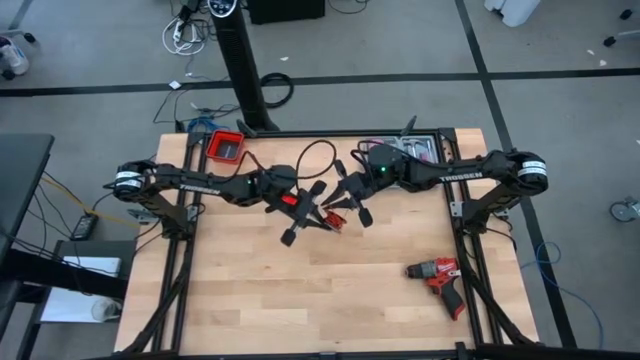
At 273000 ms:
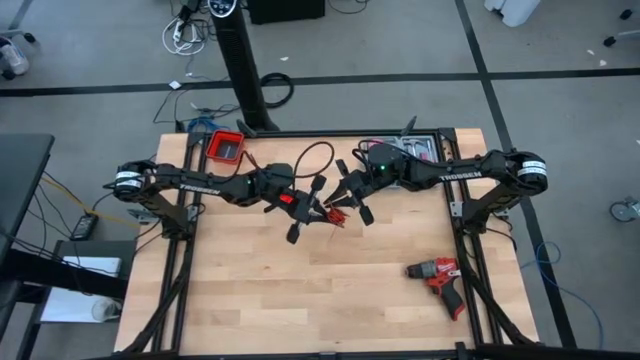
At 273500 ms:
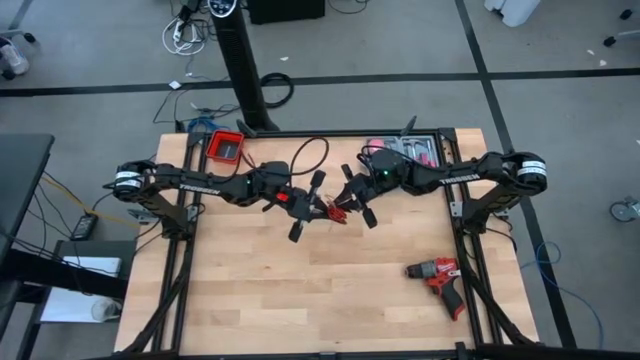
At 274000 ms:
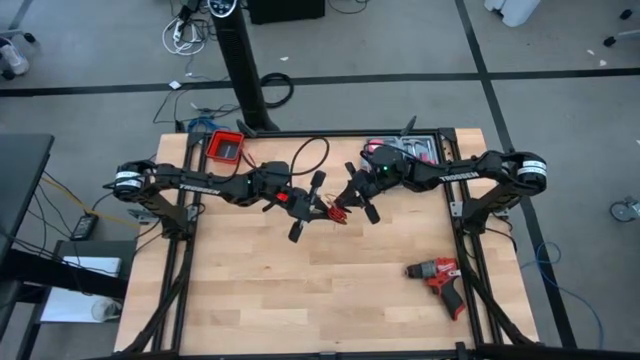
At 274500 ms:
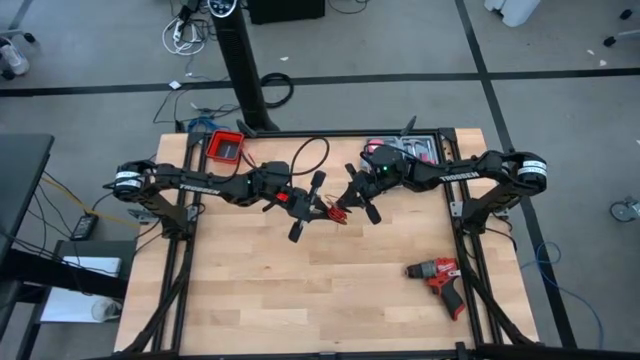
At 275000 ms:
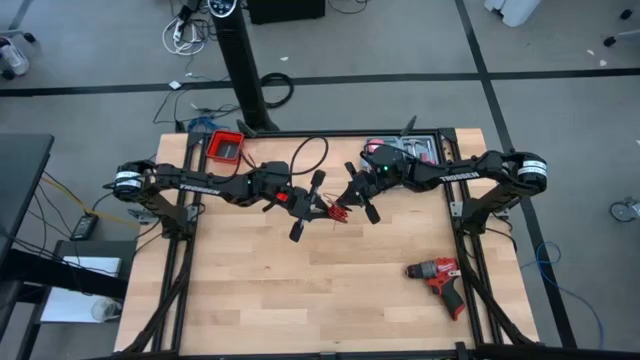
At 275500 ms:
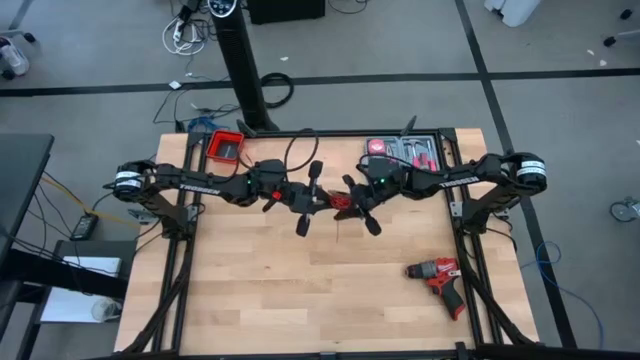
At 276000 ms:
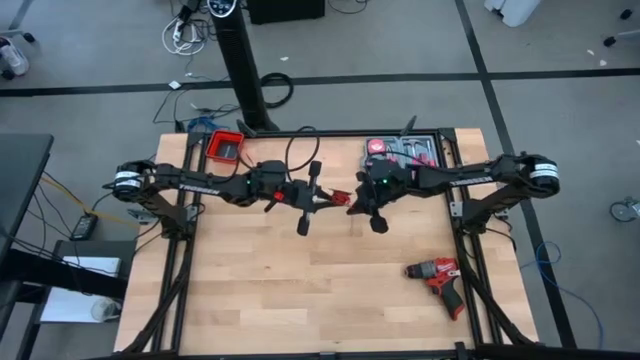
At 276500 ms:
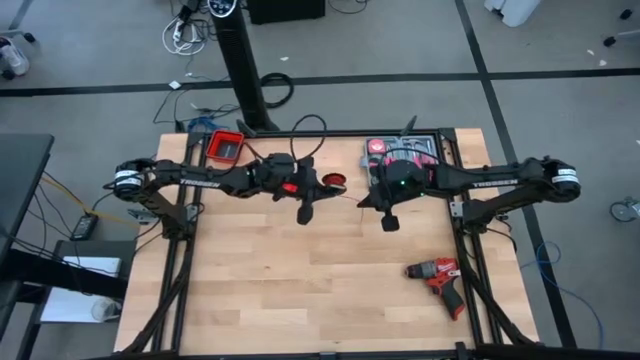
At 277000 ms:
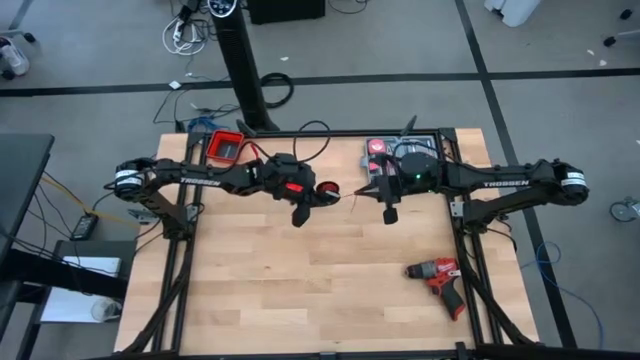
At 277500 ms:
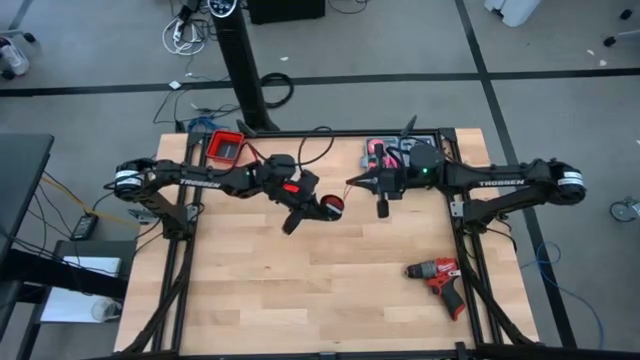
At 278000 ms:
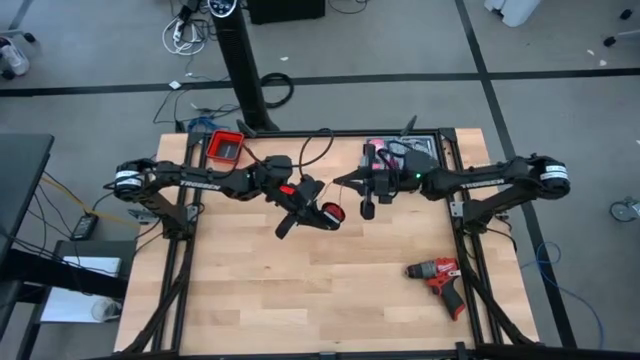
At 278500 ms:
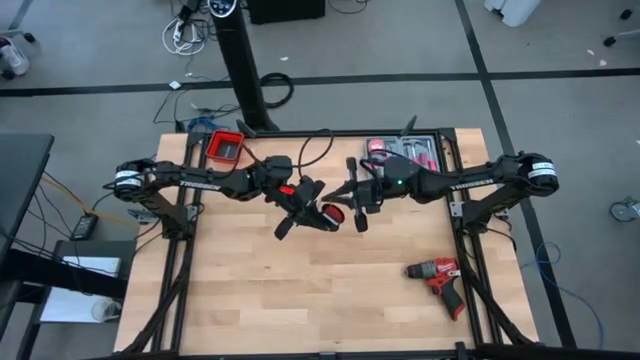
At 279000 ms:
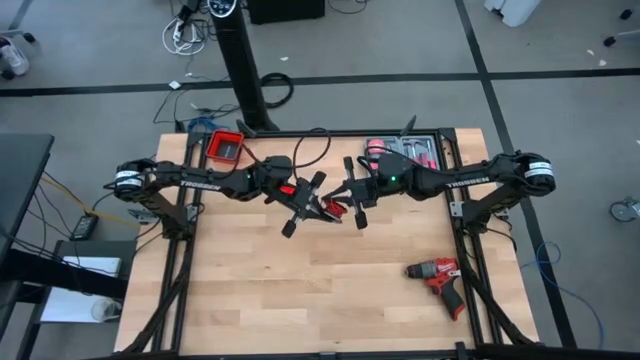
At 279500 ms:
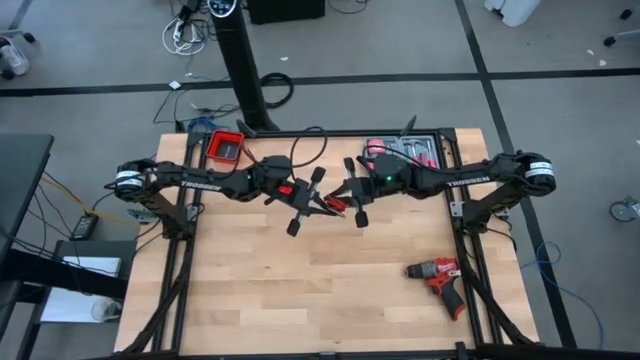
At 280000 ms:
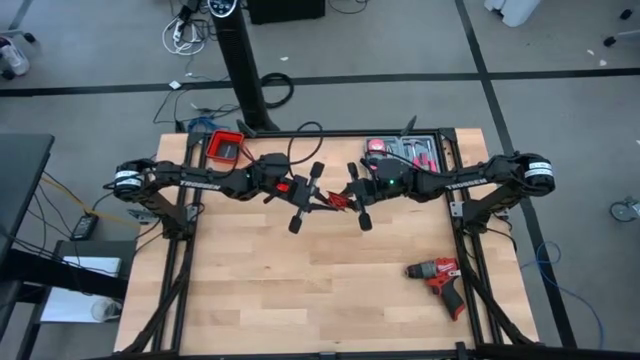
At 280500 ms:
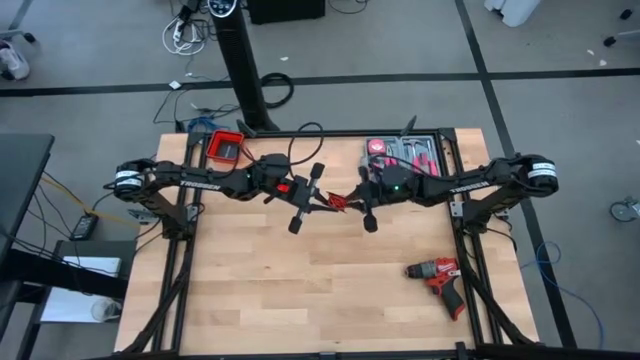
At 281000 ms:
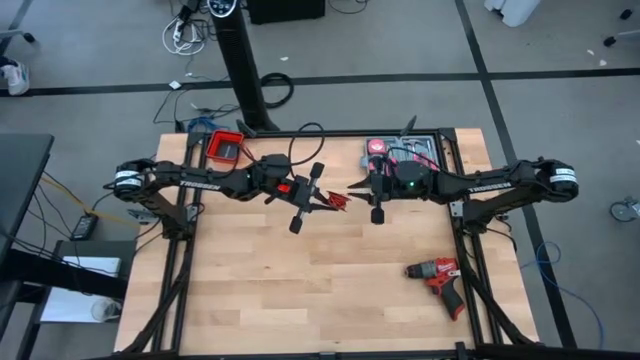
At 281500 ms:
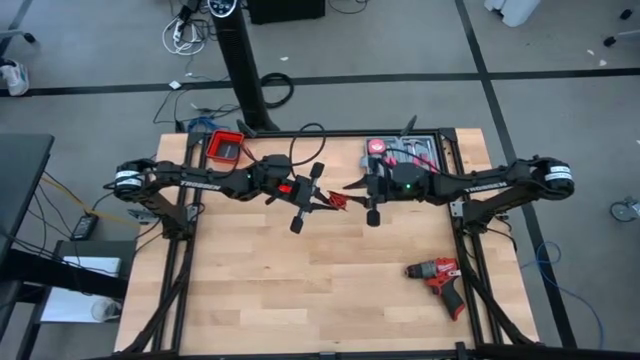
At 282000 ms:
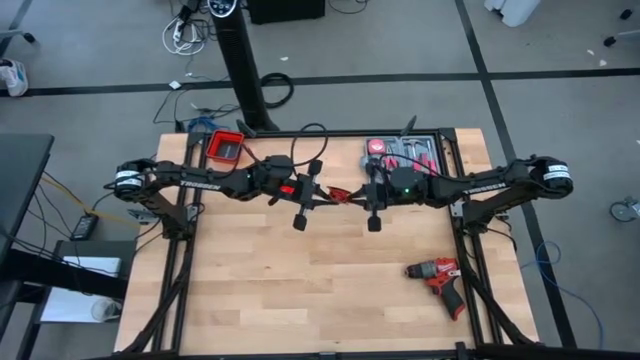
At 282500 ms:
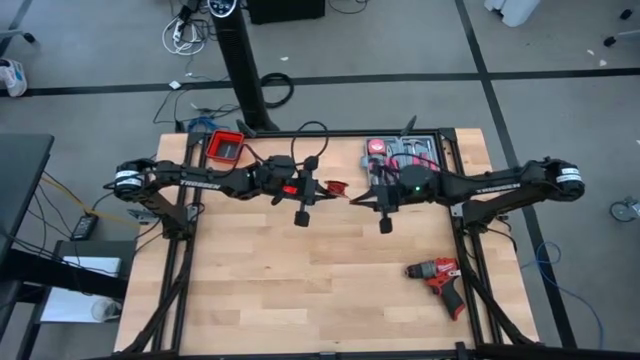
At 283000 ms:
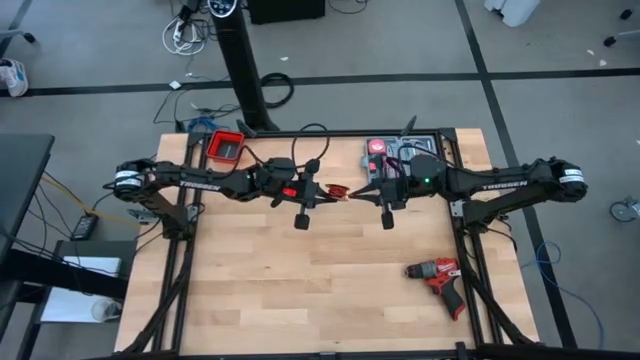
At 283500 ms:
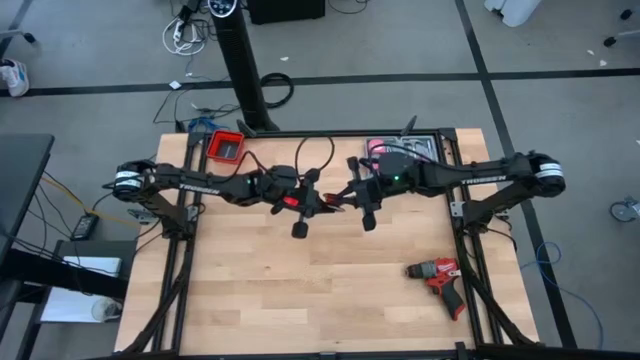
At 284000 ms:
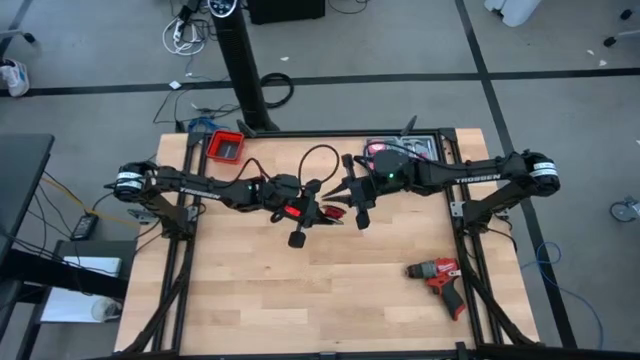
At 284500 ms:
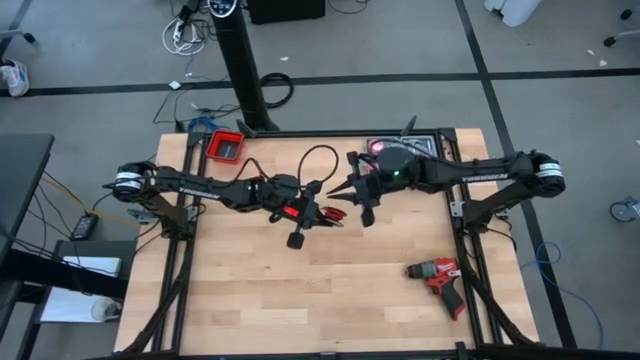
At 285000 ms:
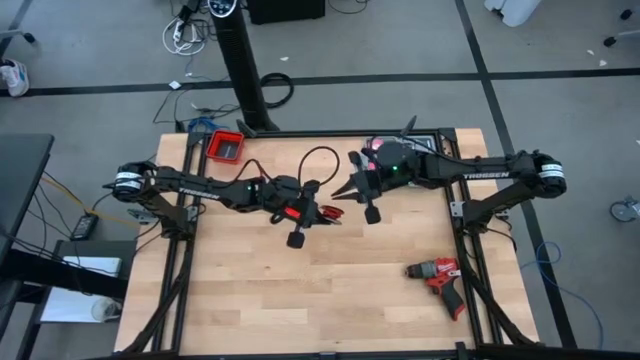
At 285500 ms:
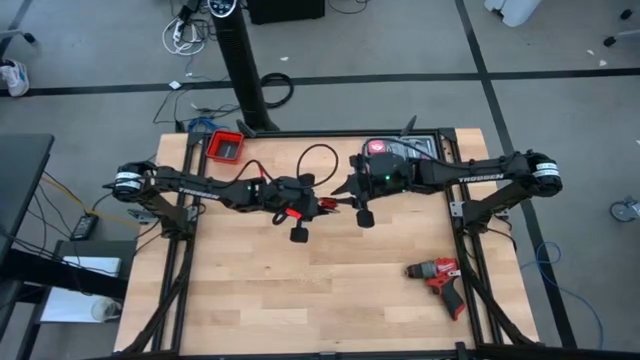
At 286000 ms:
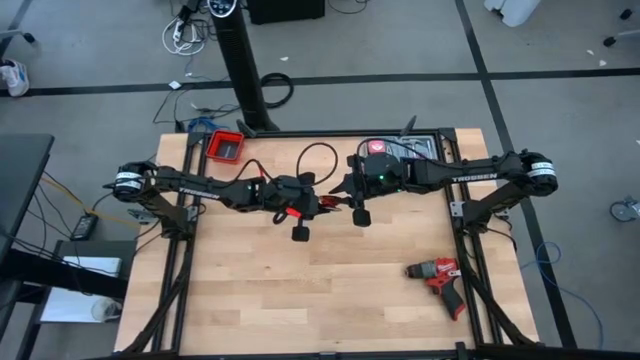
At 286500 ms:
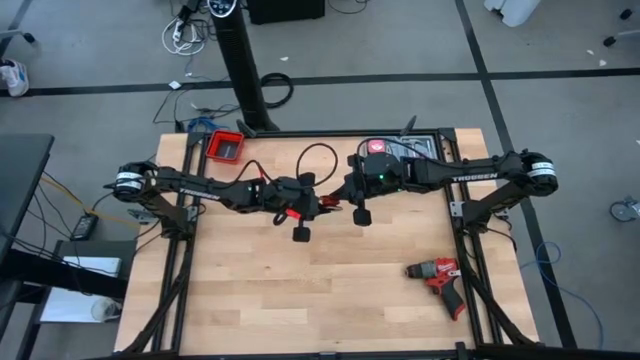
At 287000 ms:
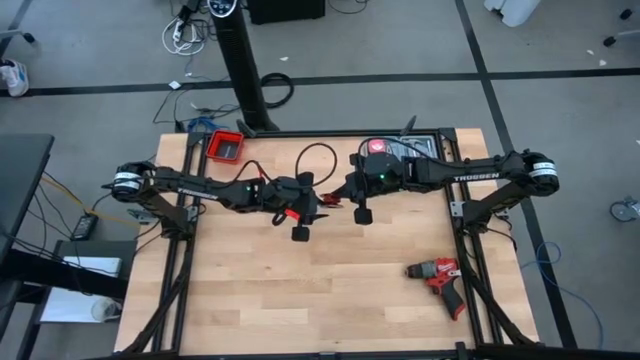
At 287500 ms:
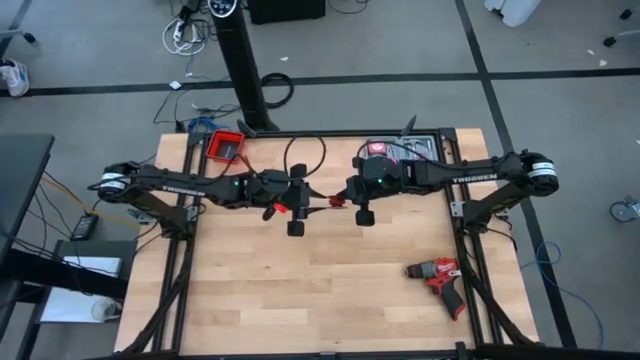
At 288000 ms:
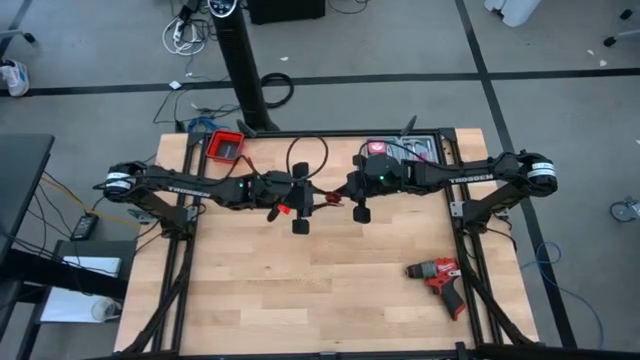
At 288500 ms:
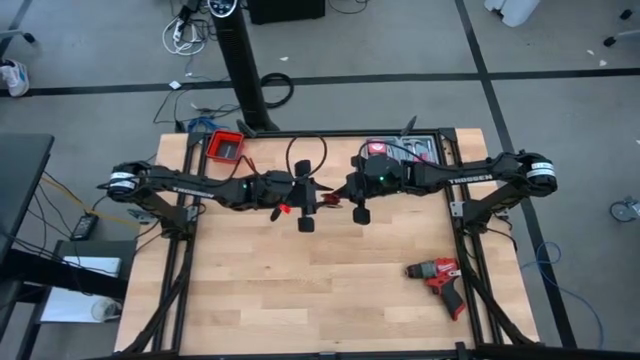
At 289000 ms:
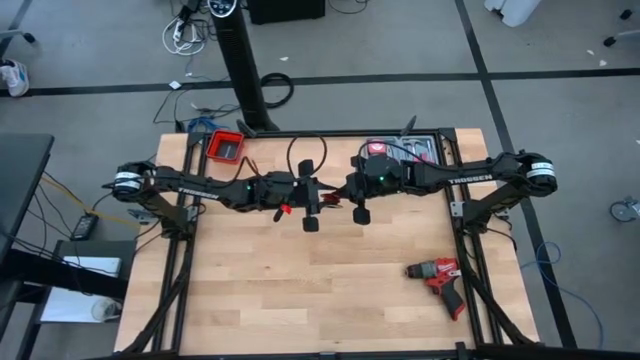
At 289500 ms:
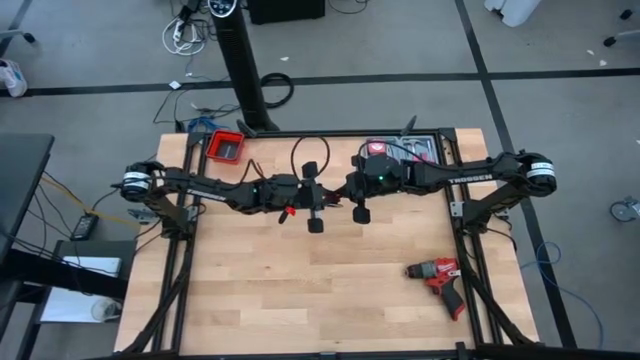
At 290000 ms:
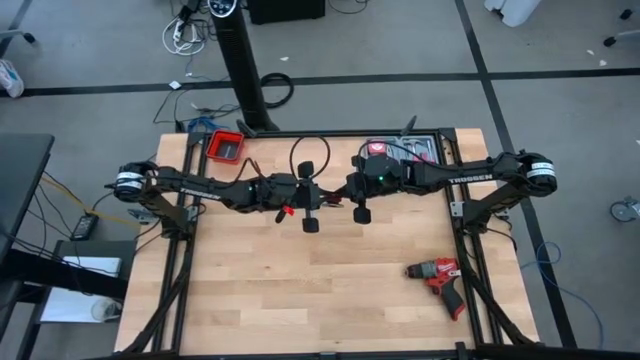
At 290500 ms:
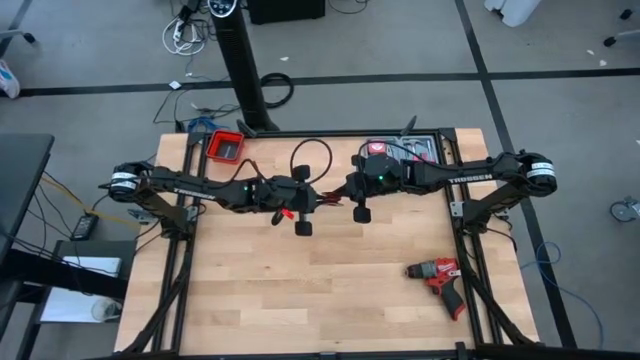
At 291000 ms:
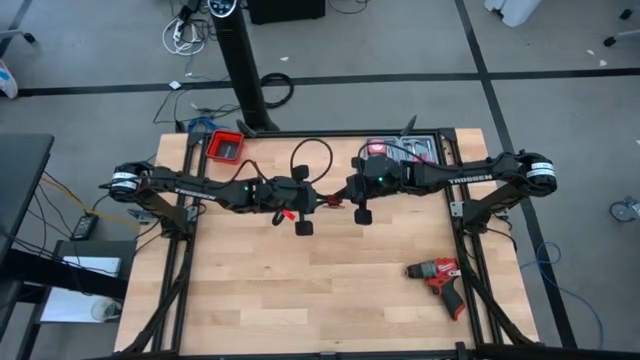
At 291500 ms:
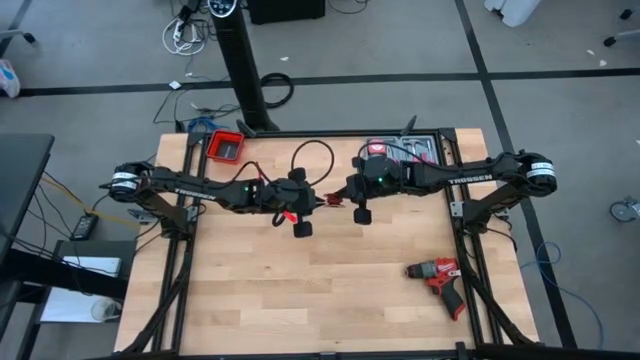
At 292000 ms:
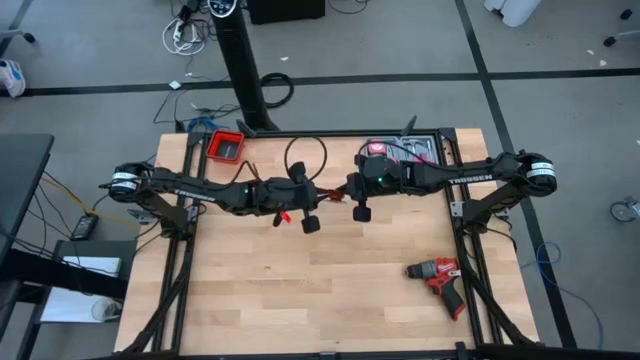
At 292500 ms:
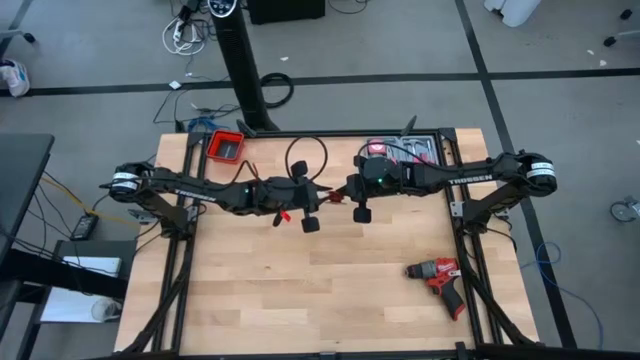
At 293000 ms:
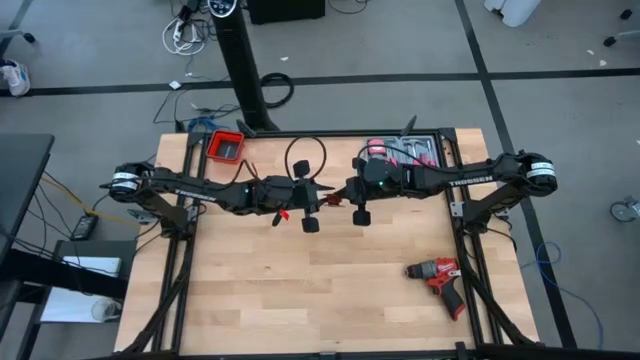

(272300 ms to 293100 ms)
Task: Coil cords
Coil the red wire onto the black spool

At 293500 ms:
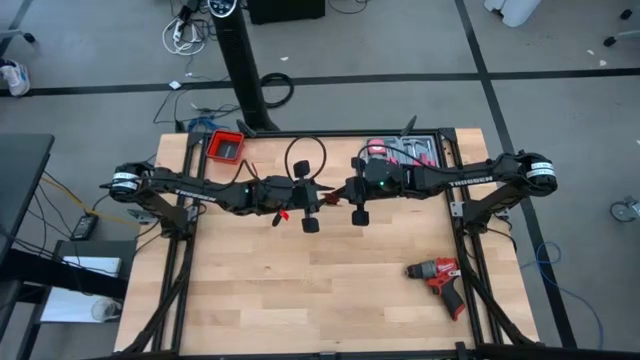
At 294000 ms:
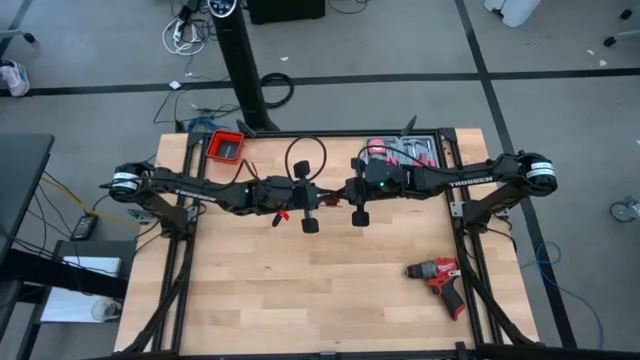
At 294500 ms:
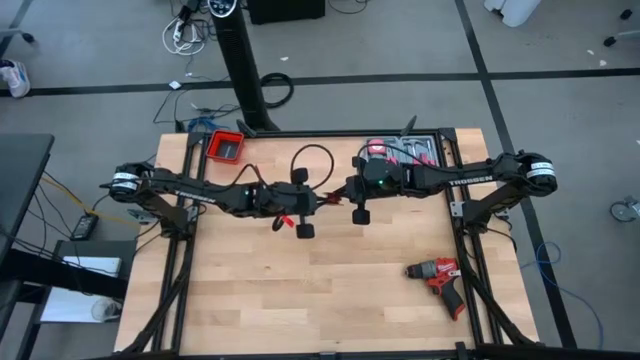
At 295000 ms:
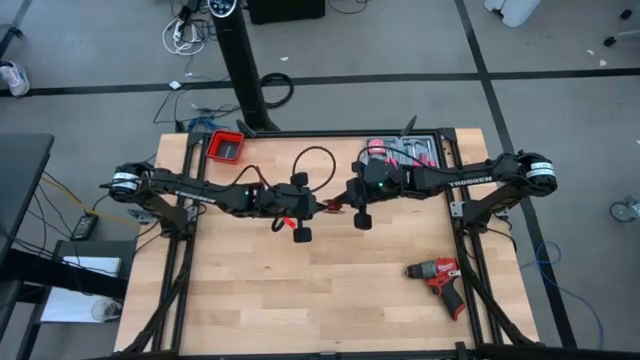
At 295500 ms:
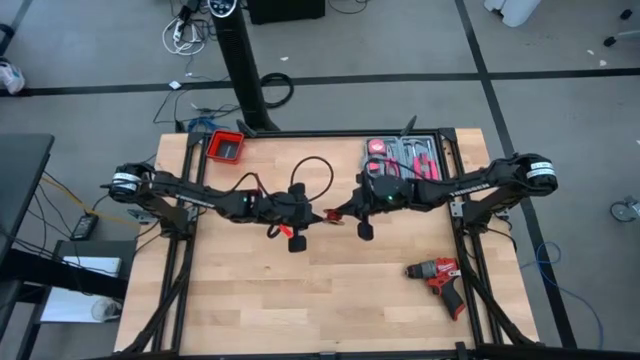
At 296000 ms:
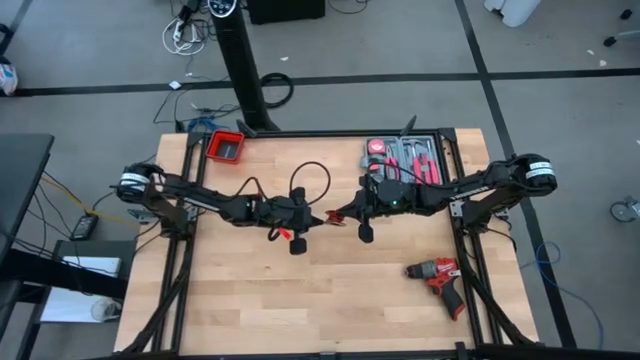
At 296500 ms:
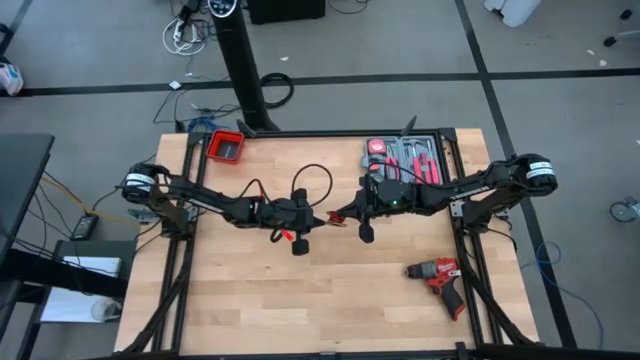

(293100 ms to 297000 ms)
Coil the red wire onto the black spool
